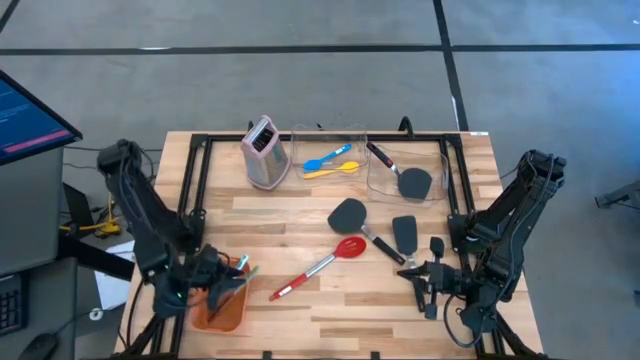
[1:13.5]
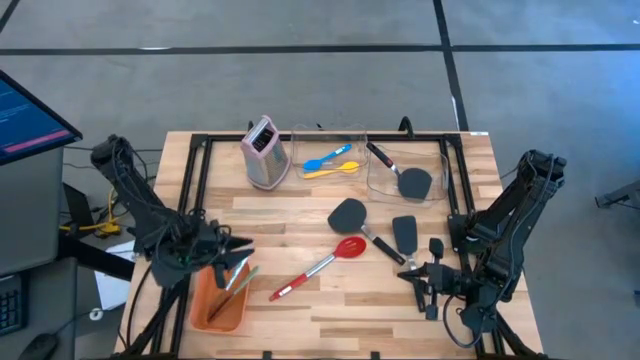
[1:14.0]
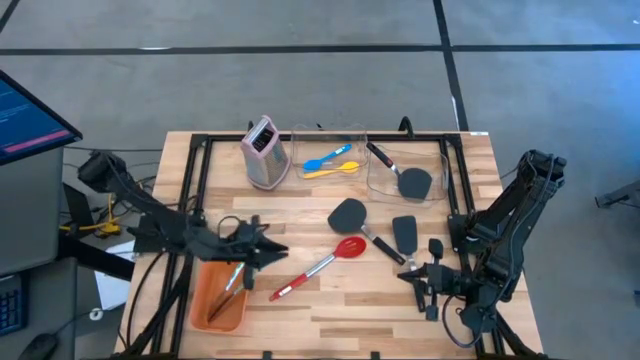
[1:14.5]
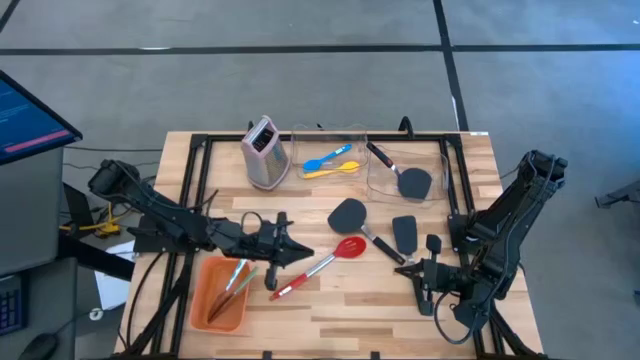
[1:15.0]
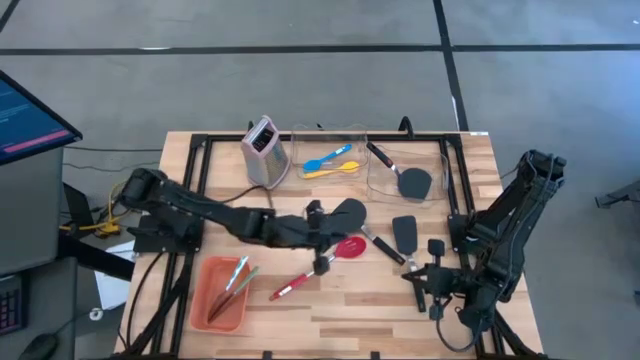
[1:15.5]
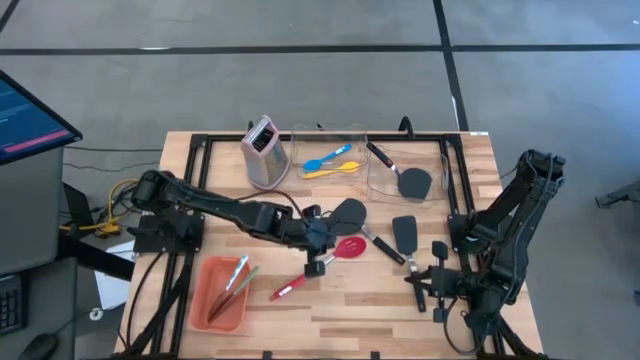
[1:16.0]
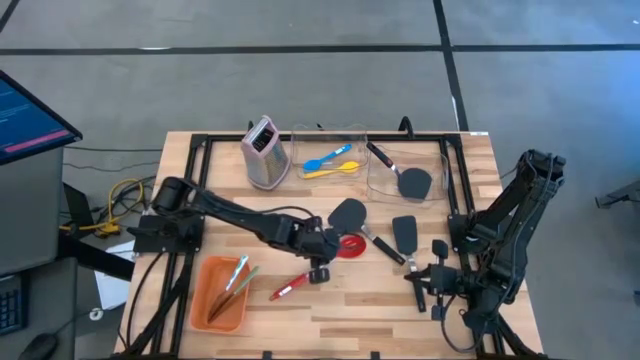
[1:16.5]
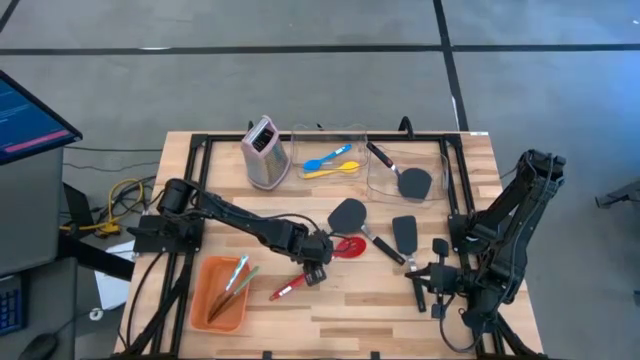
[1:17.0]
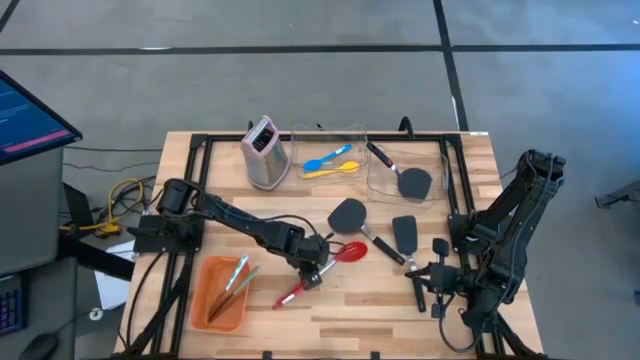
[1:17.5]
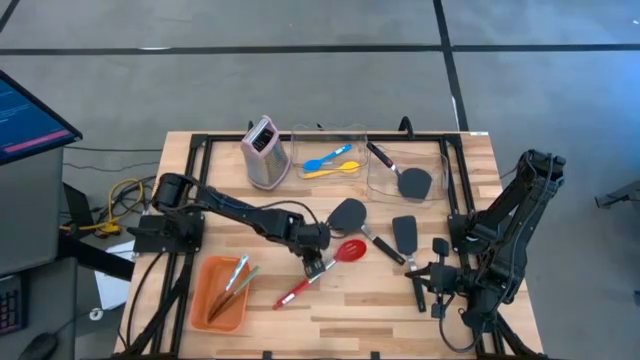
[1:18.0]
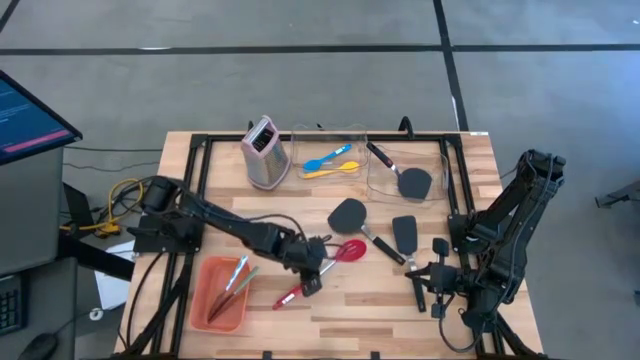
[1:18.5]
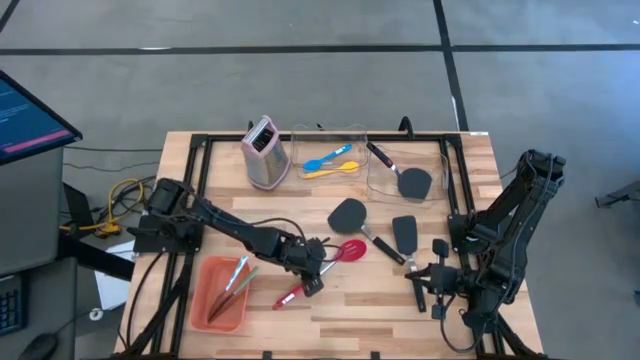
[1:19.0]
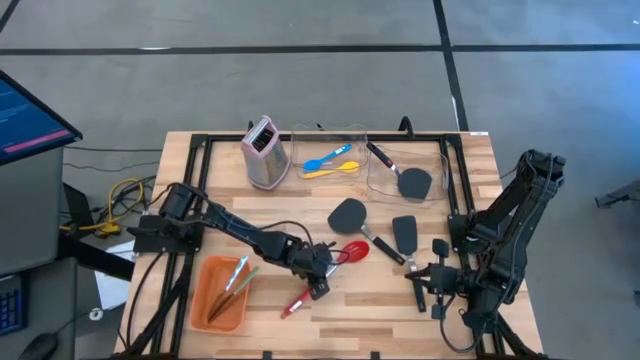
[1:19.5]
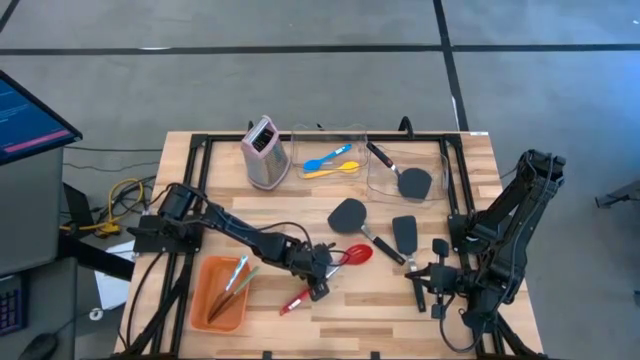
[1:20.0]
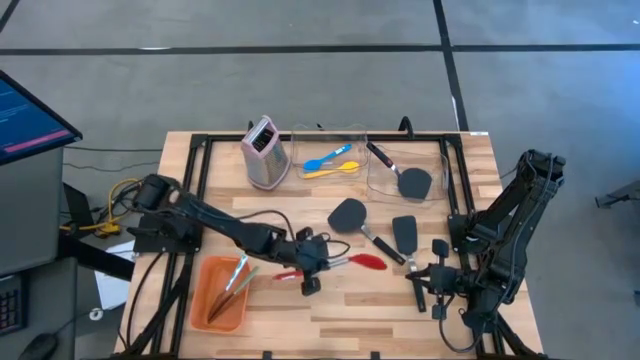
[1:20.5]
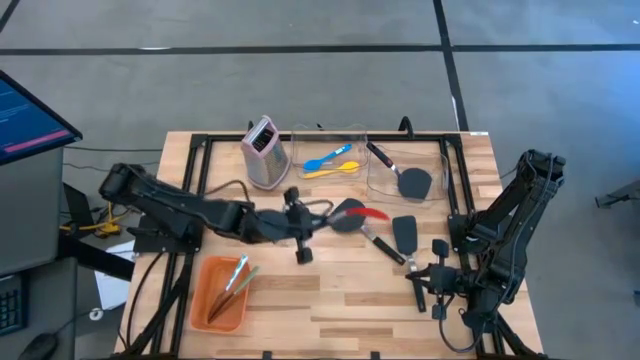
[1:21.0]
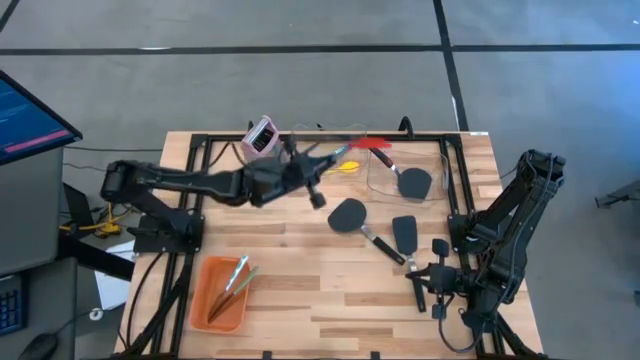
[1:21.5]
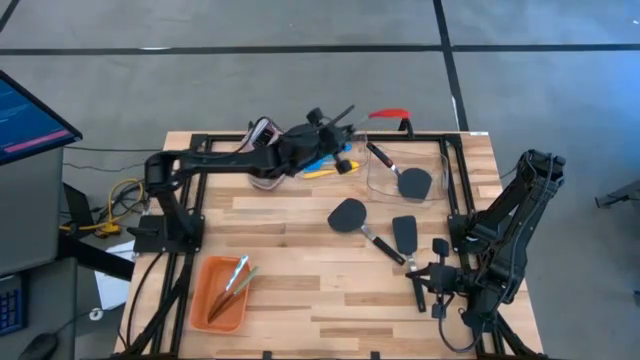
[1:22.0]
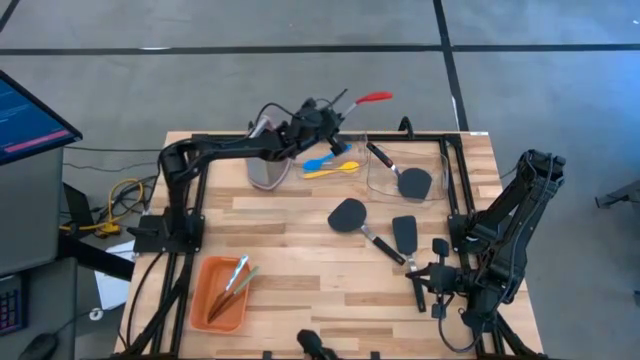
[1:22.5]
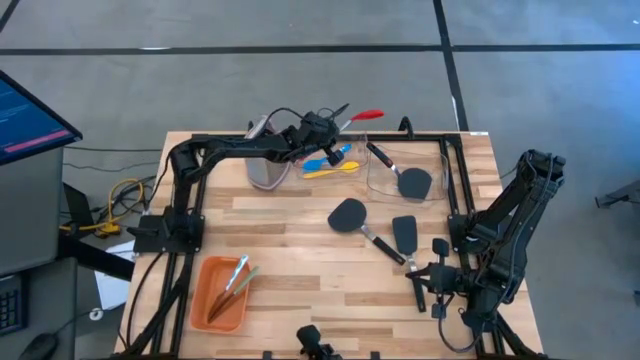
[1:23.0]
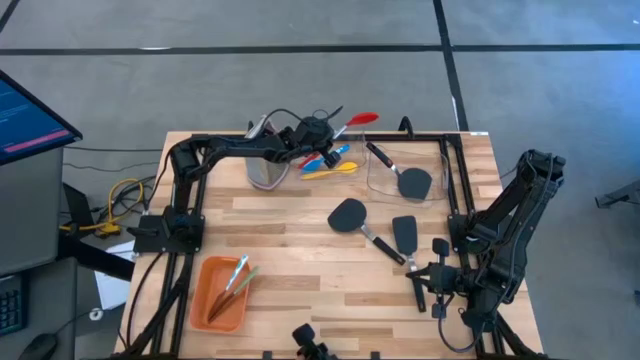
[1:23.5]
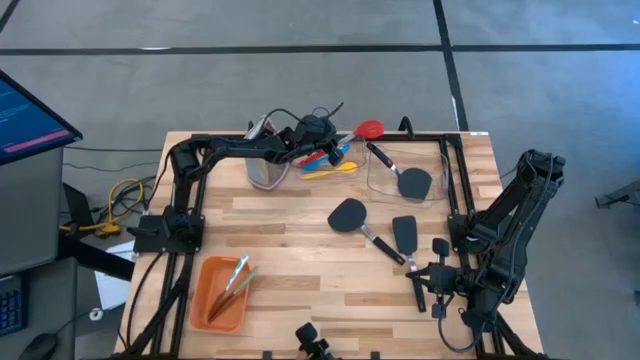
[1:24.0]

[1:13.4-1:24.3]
Task: Pick & Place Kitchen Items
Put the red serving spoon into the left transparent bin

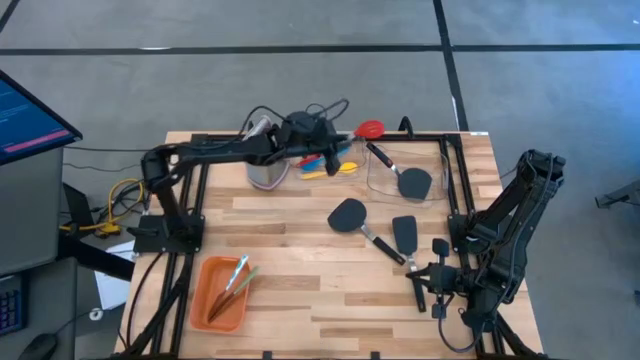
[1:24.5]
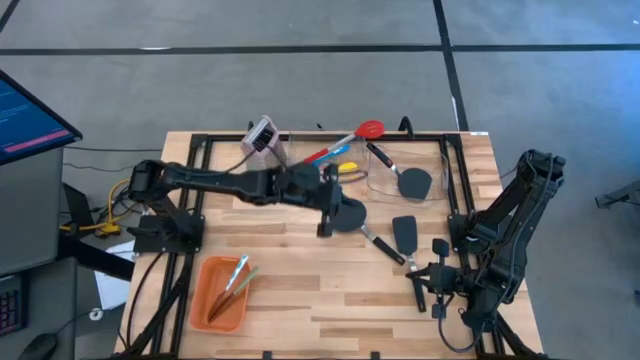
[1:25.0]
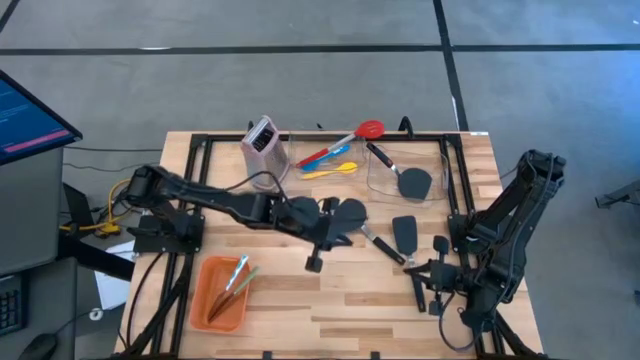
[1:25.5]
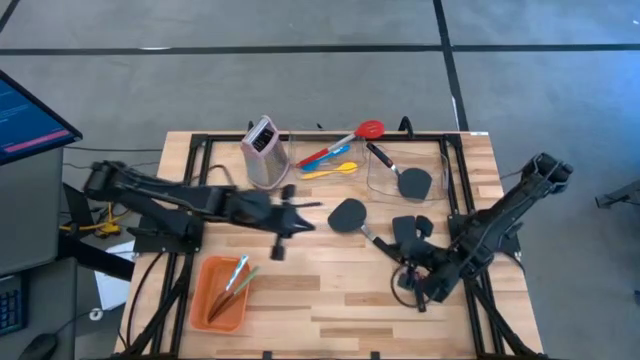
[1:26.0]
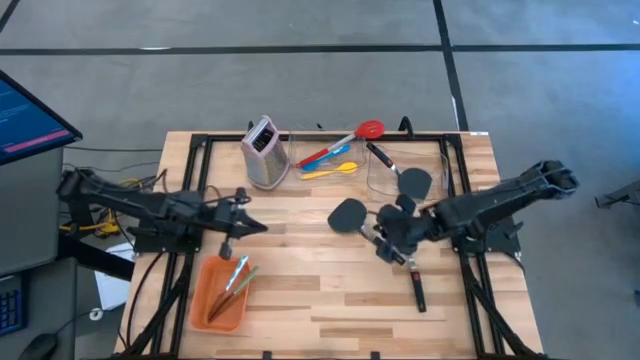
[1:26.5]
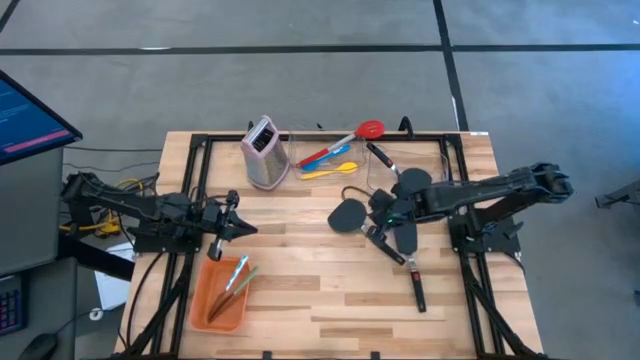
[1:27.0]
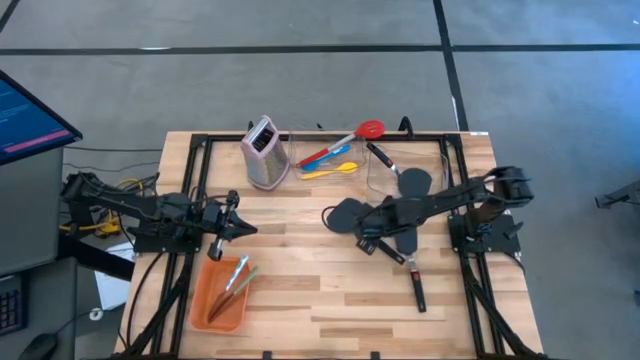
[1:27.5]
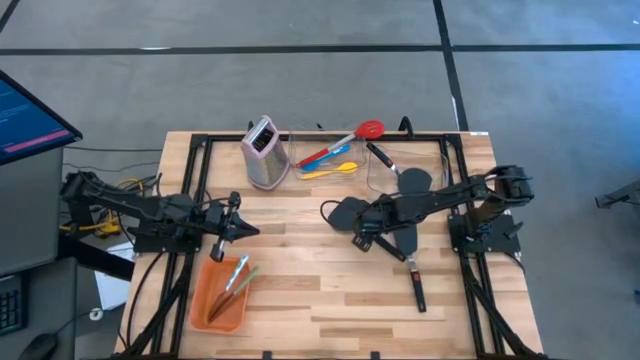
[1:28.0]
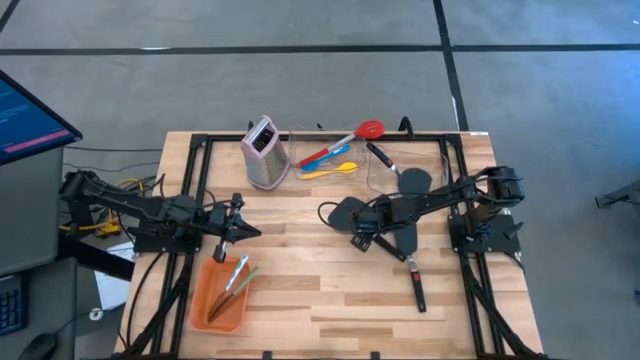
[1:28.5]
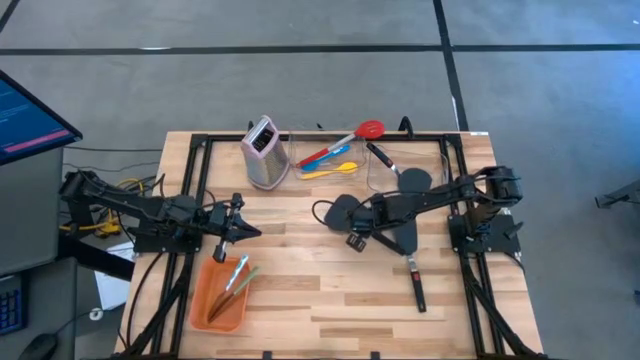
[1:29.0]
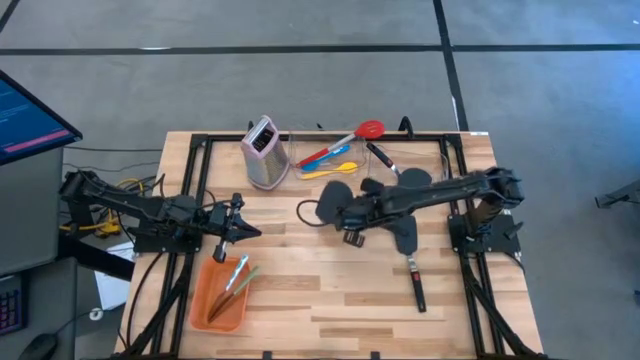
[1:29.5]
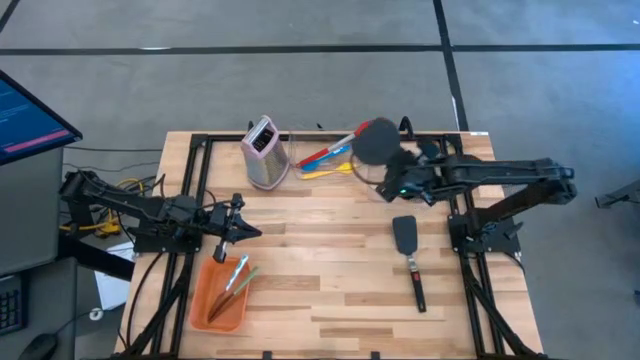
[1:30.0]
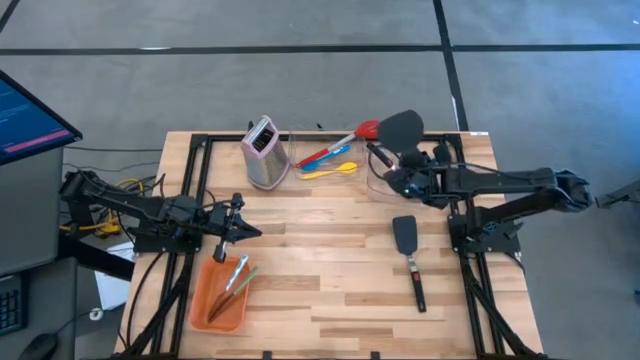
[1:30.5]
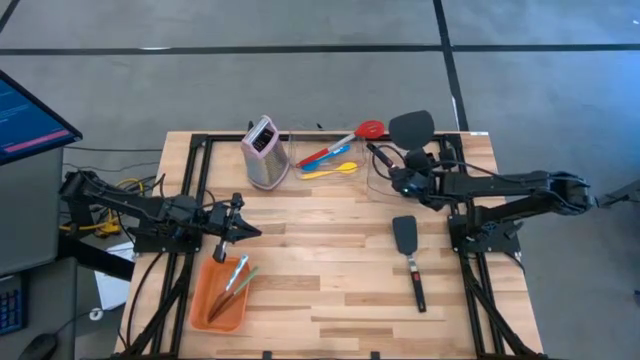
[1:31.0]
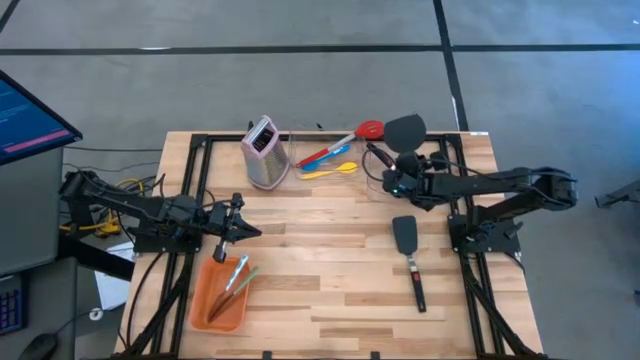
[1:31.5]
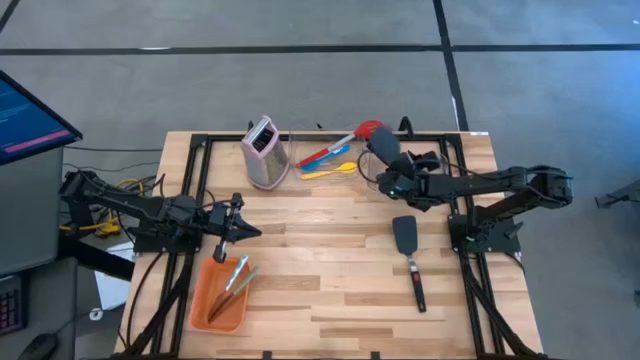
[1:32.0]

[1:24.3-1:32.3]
Put the top black spatula into the right transparent bin

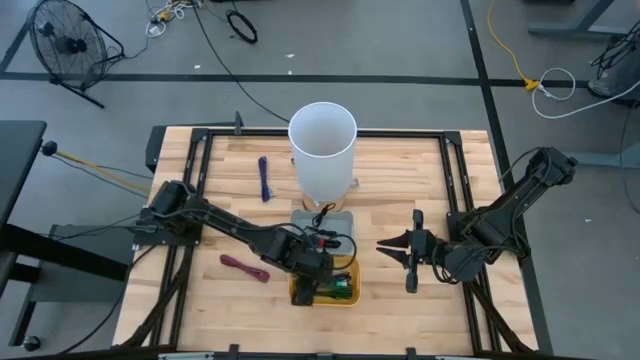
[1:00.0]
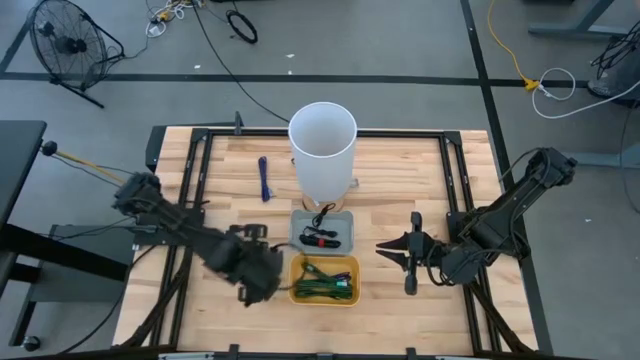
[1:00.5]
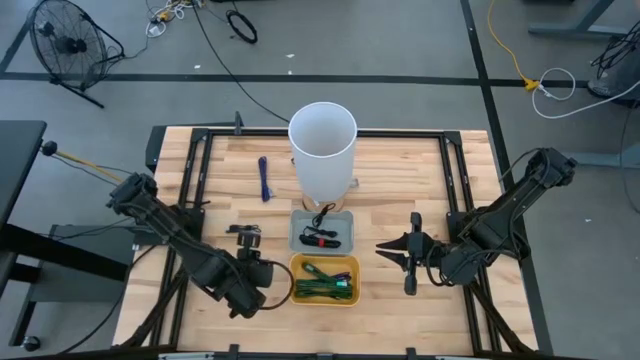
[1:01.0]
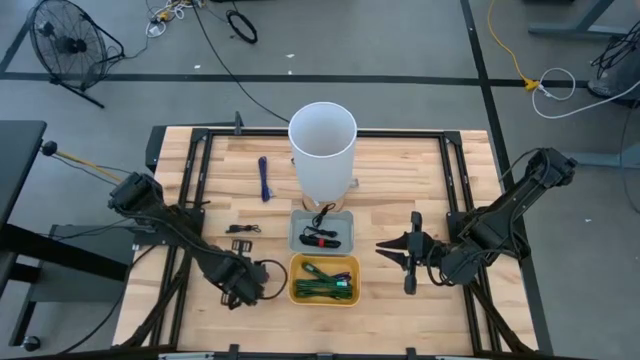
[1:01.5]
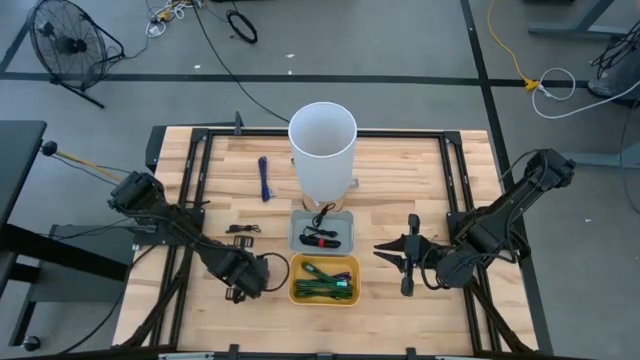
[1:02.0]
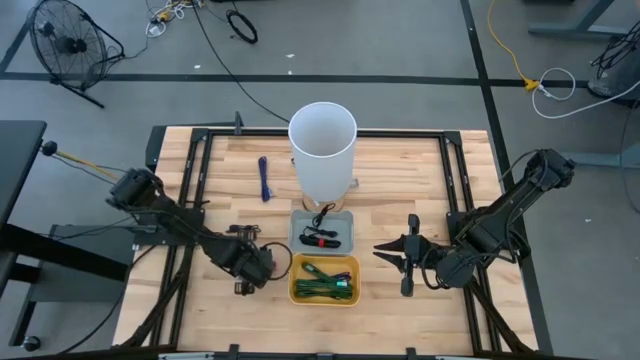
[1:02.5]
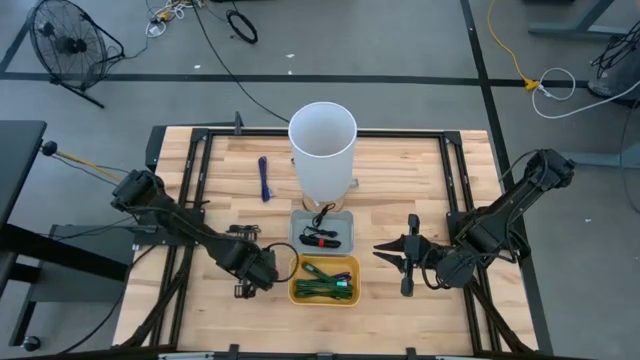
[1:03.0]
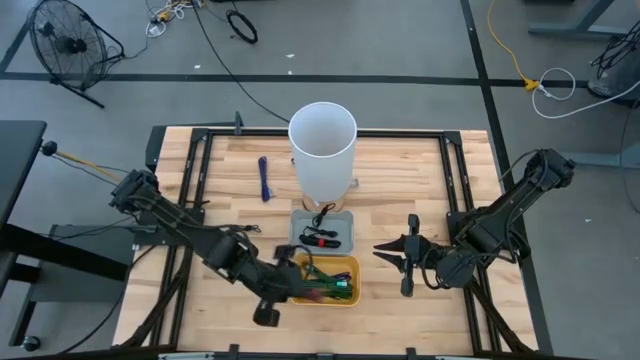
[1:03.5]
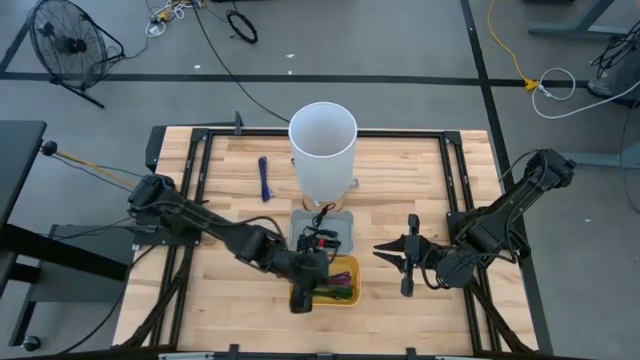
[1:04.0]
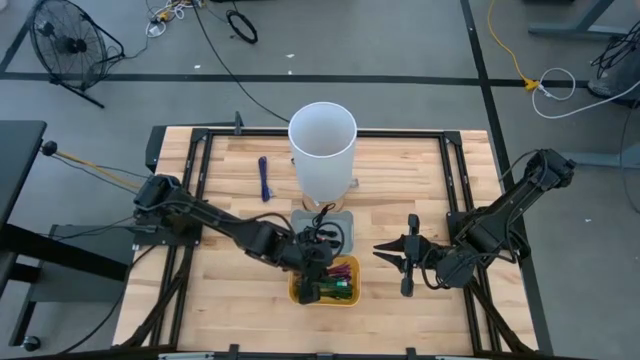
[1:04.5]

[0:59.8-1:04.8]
Task: Pick & Place USB Port
Put the pink charger cable into the yellow bin
